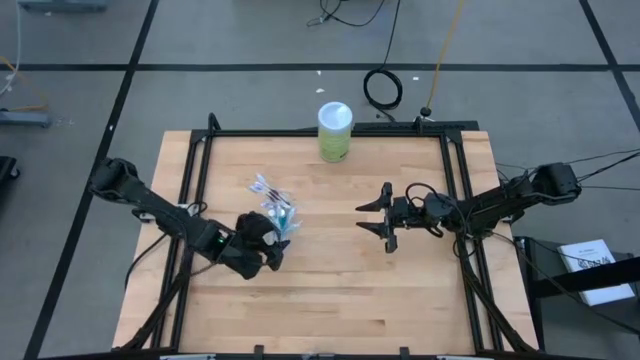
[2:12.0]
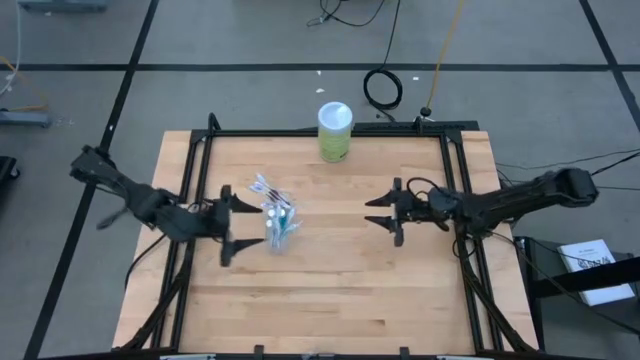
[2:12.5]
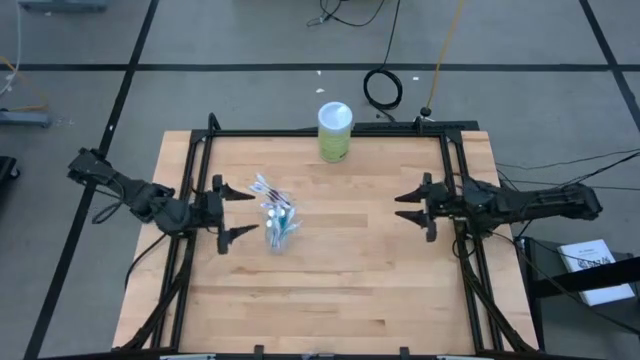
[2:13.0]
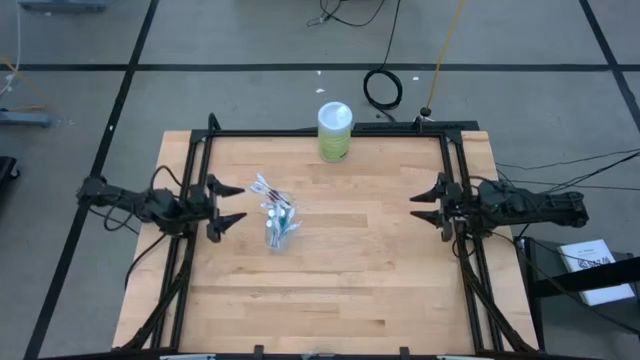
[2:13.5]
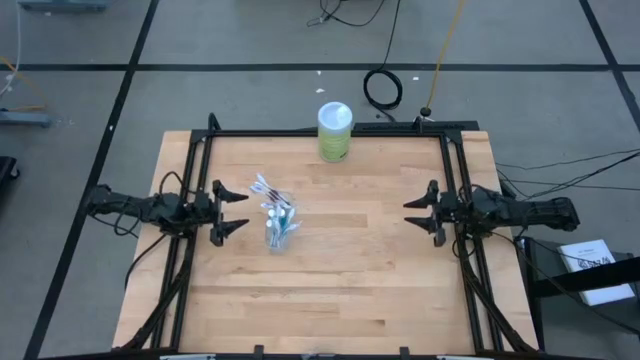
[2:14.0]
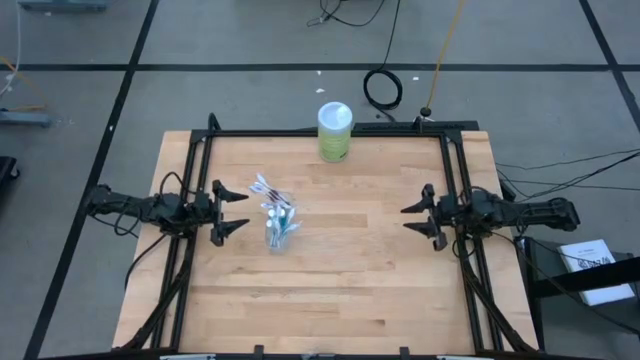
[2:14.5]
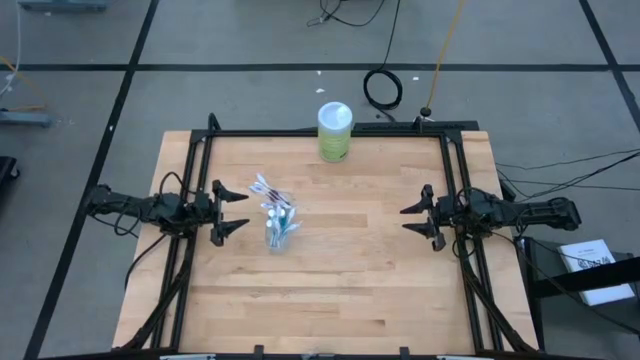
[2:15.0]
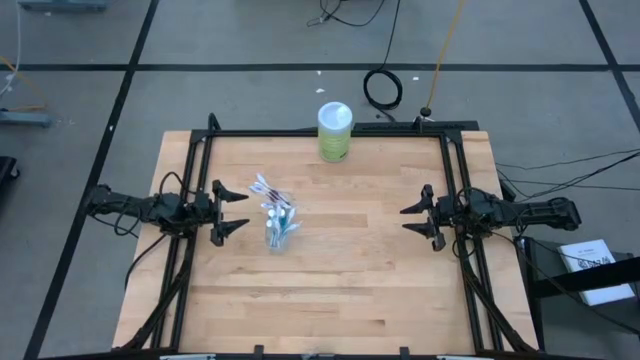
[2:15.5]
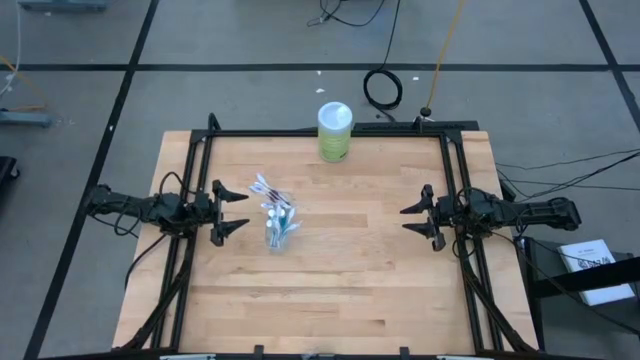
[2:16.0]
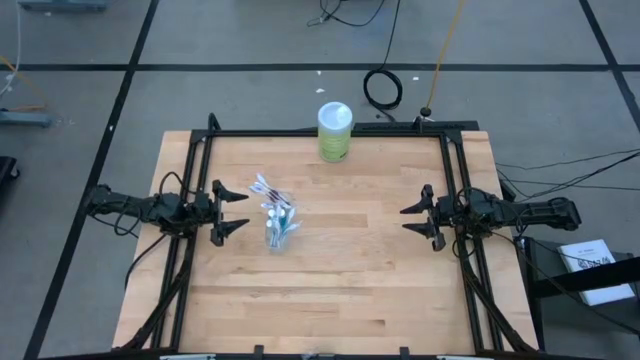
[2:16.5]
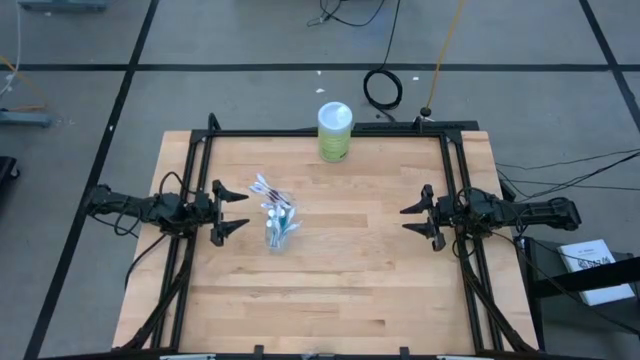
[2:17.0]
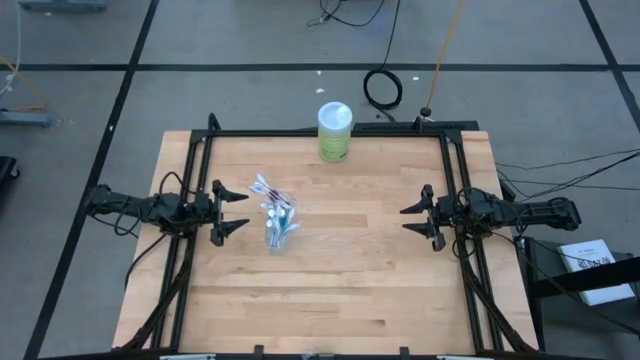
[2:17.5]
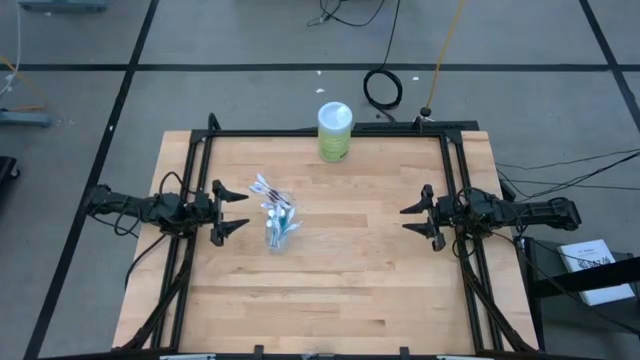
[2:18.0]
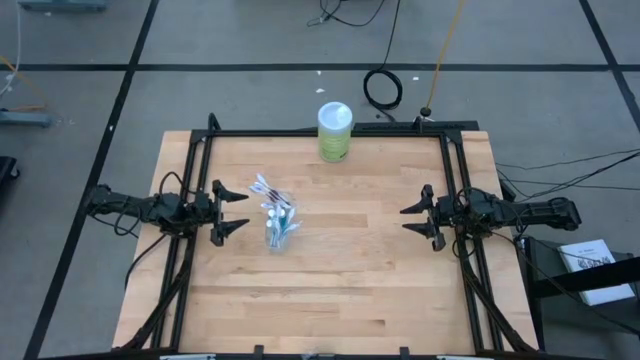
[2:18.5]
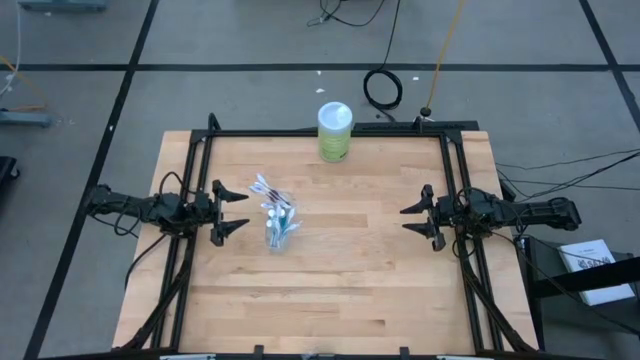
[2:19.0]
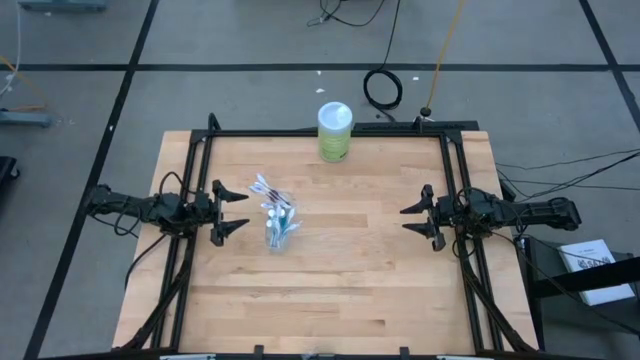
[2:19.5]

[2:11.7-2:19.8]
Task: Pick & Place toothbrushing station
Return to Home Position

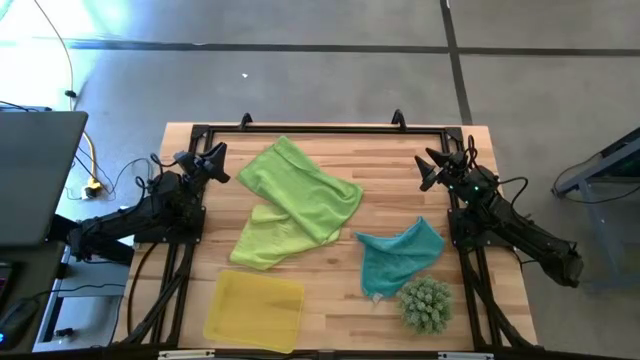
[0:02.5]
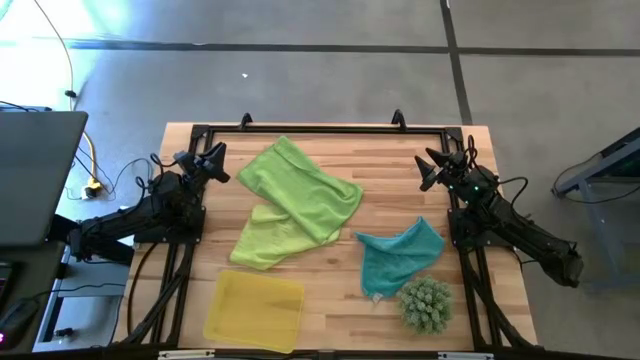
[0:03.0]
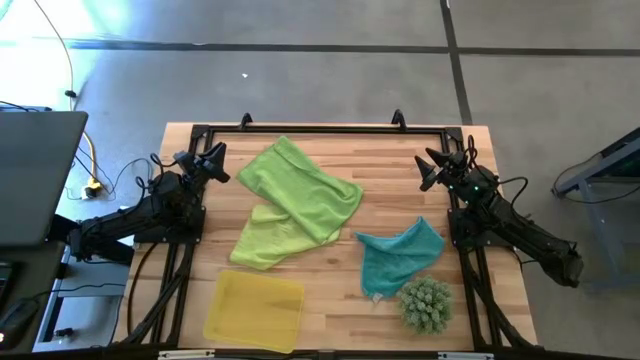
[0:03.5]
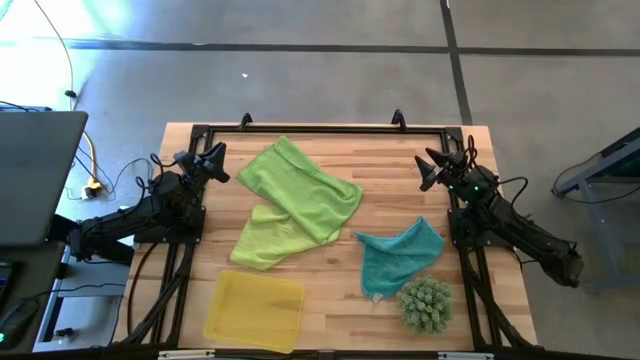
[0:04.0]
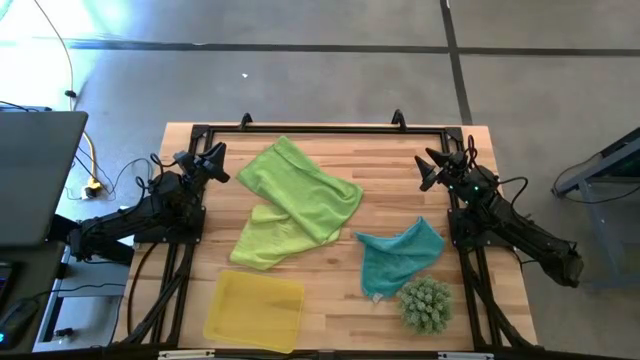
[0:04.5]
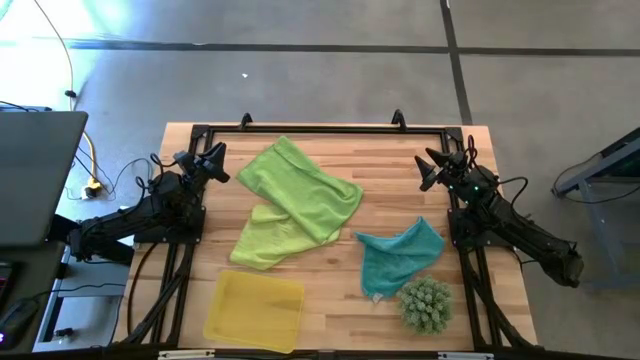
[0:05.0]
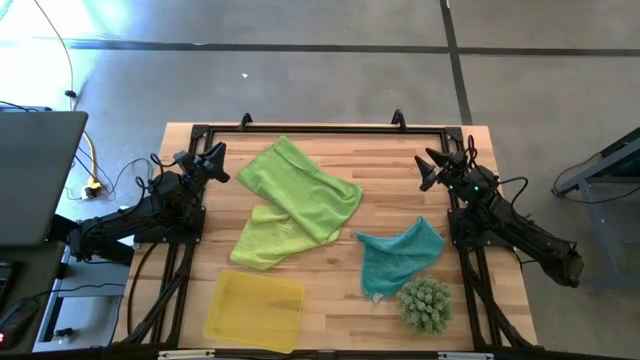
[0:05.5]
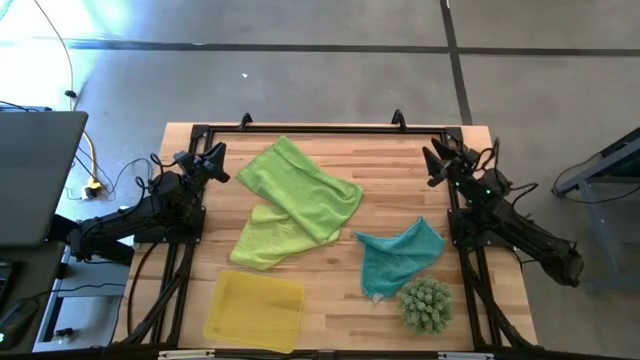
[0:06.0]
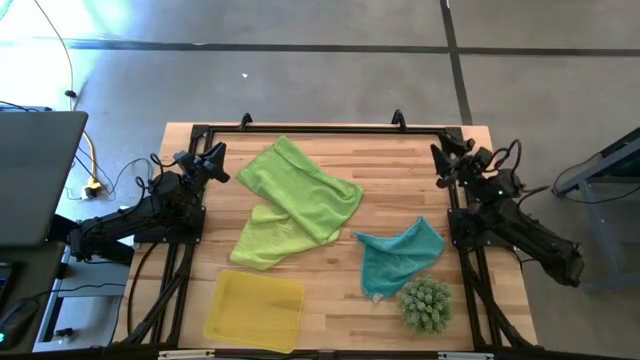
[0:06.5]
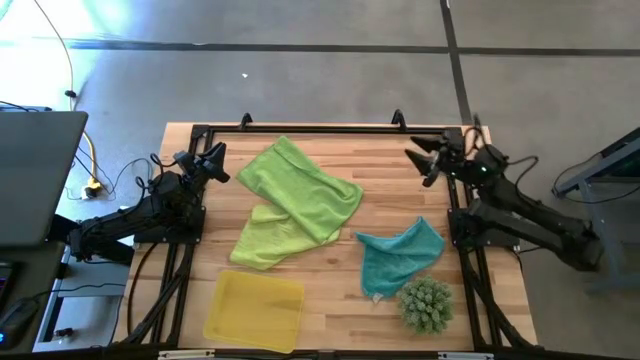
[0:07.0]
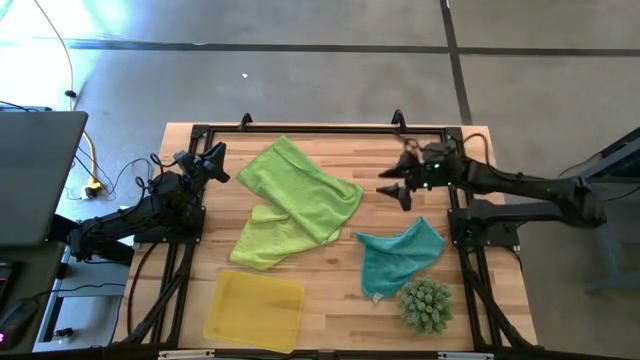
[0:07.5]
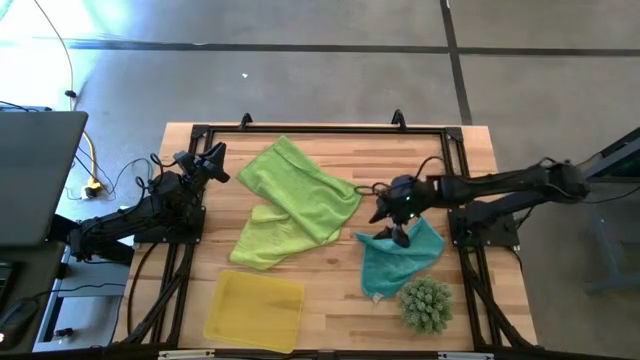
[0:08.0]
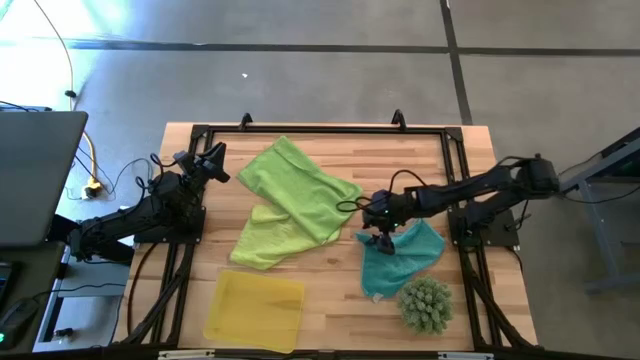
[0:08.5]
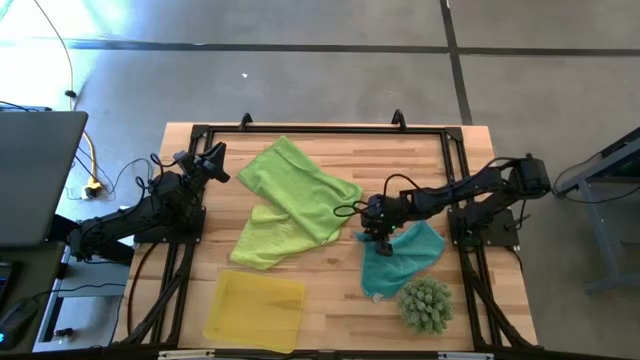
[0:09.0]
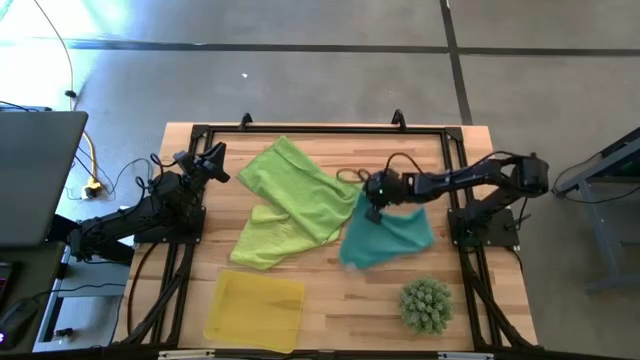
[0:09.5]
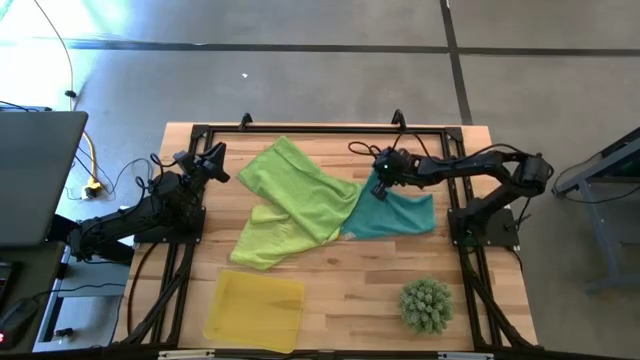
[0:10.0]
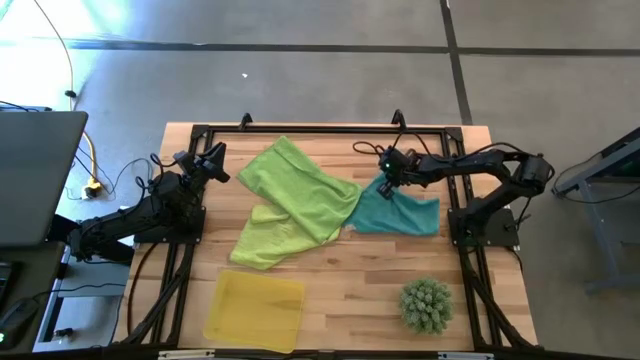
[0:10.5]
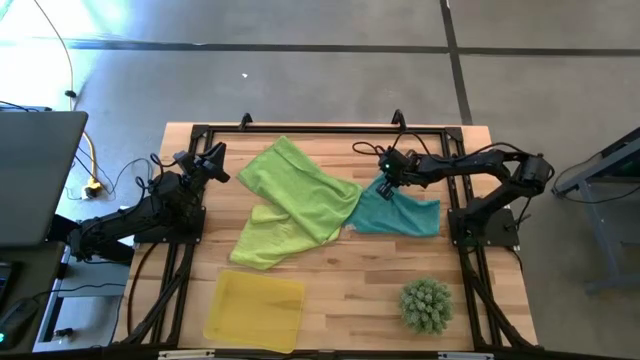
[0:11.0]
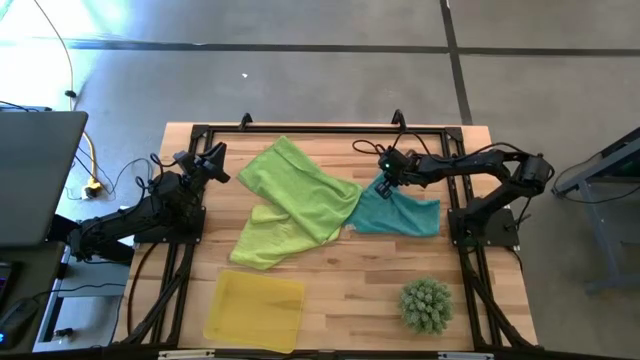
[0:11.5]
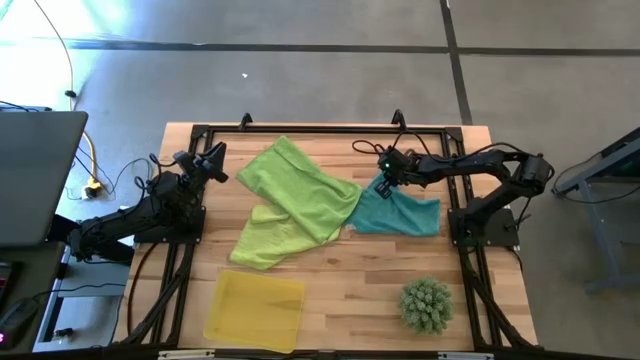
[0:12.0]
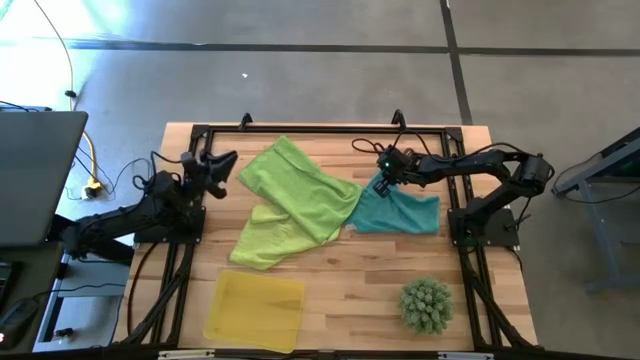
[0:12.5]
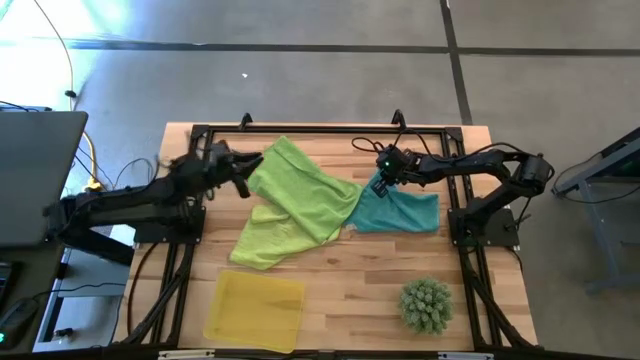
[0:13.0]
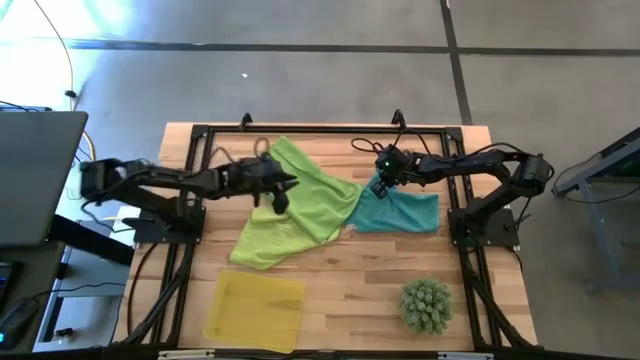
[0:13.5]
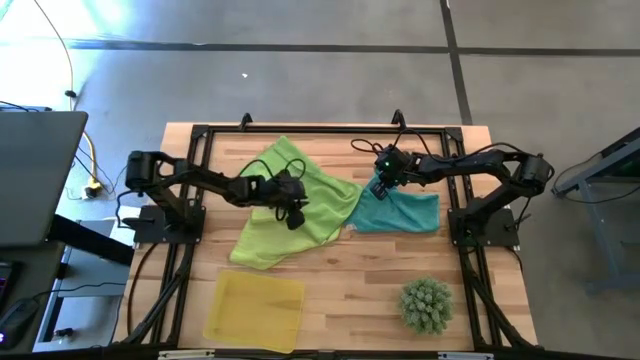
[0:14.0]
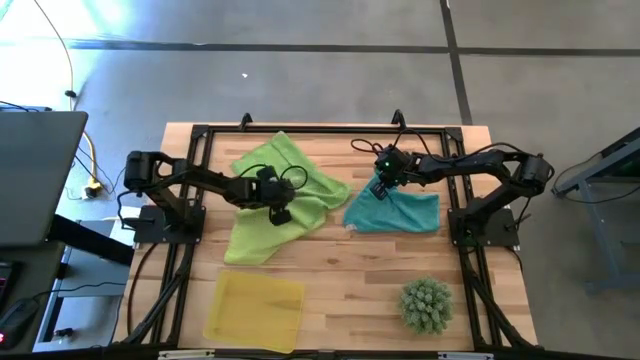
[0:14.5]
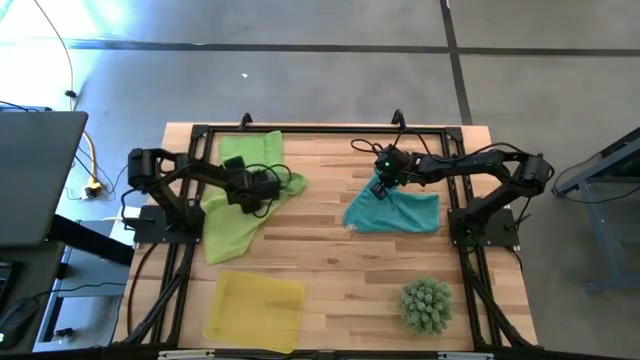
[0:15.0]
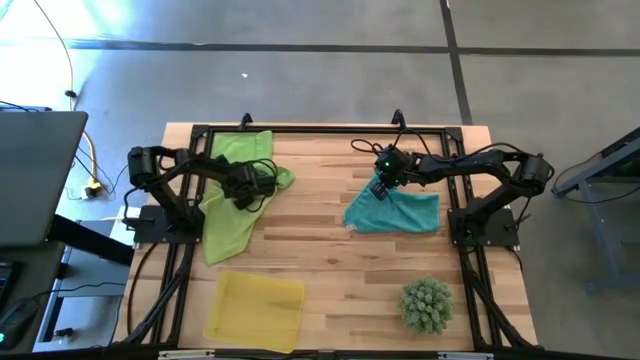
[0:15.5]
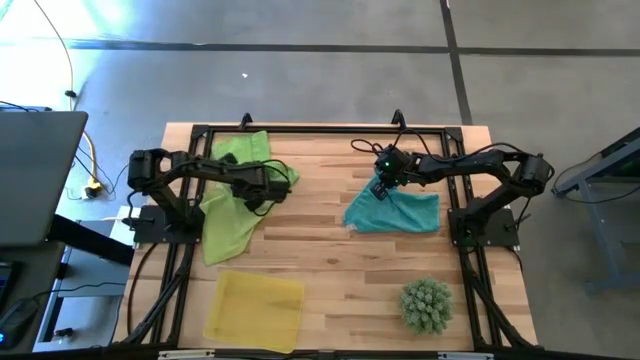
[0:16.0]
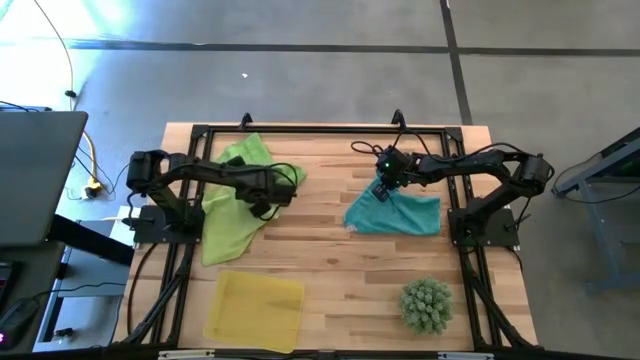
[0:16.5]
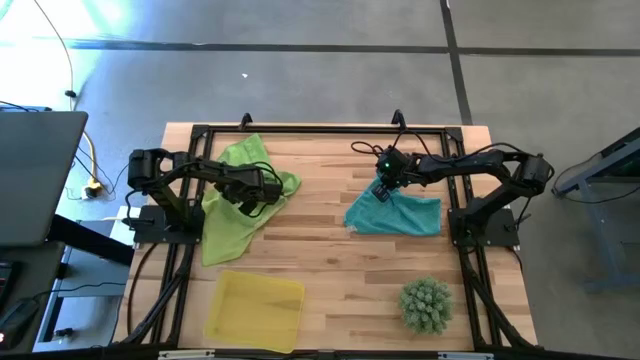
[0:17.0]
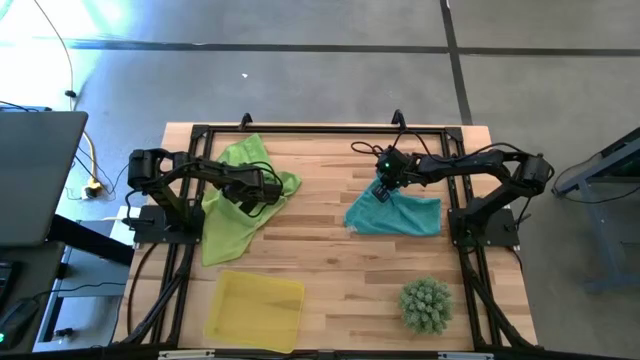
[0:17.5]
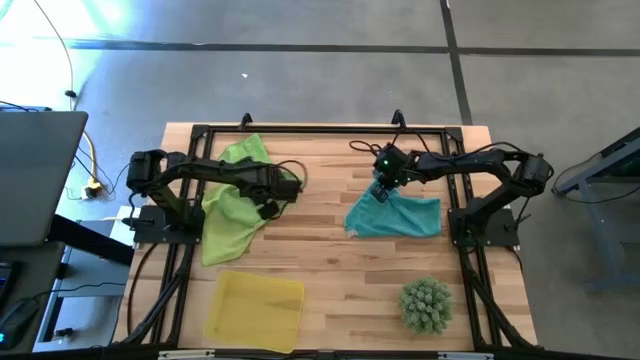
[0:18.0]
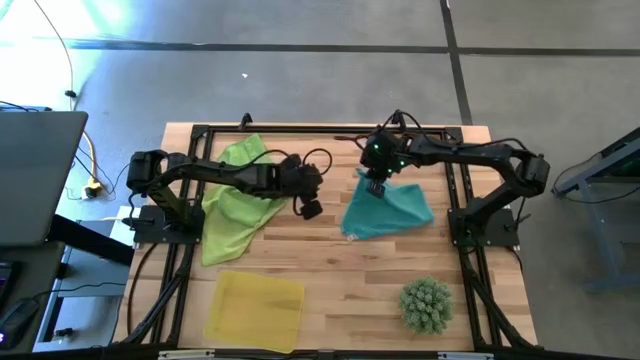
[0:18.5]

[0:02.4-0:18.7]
Task: Roll microfiber towels into tight, uniform cylinder then place into a basket
Fold the blue microfiber towel
